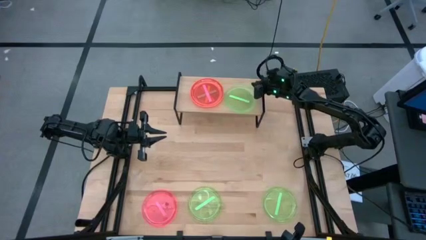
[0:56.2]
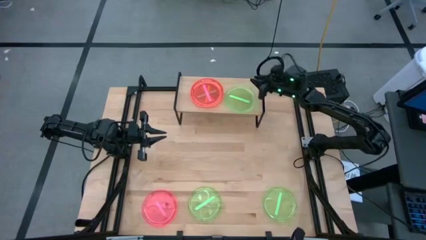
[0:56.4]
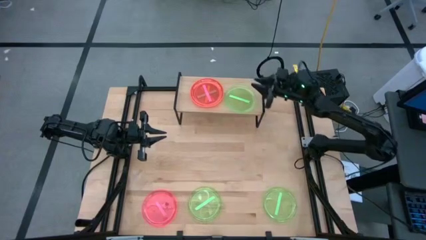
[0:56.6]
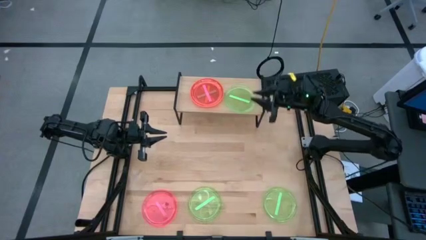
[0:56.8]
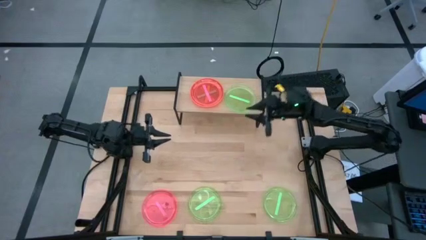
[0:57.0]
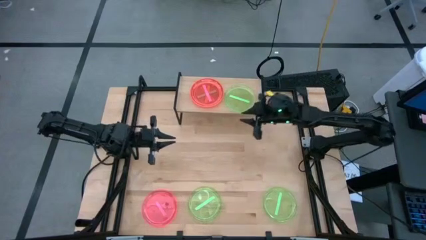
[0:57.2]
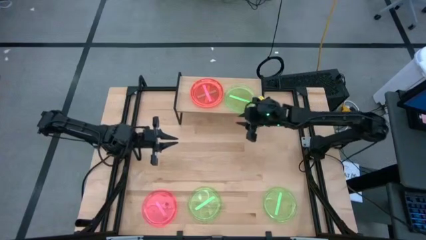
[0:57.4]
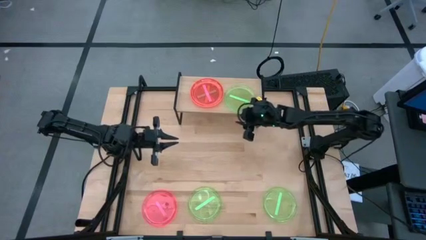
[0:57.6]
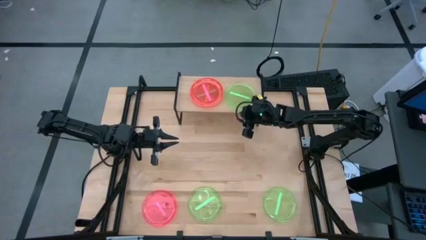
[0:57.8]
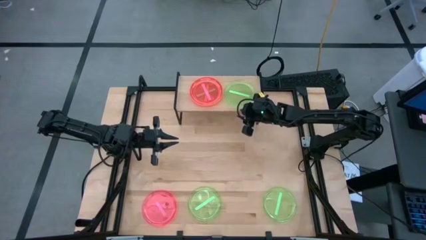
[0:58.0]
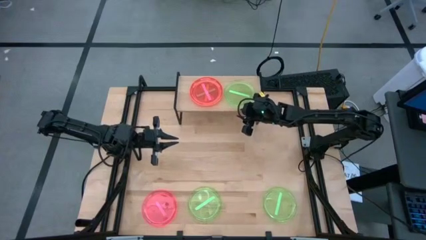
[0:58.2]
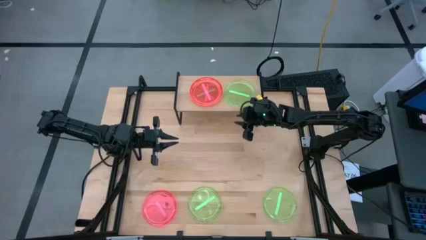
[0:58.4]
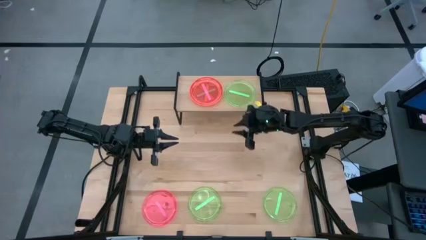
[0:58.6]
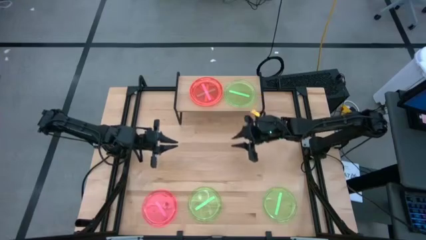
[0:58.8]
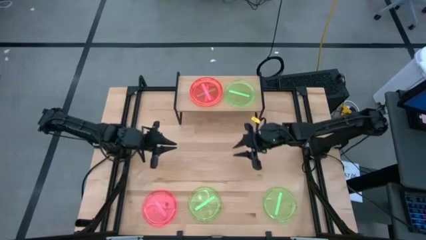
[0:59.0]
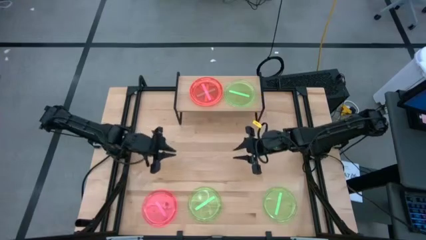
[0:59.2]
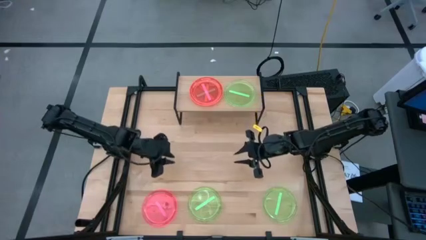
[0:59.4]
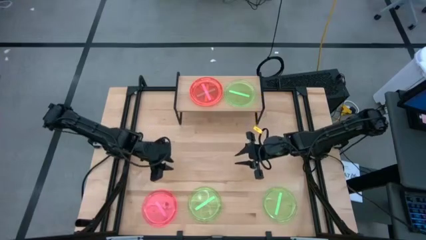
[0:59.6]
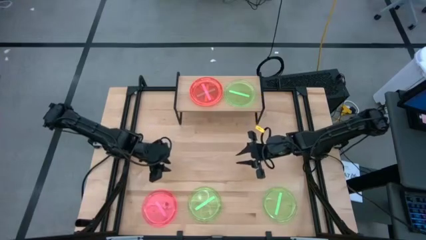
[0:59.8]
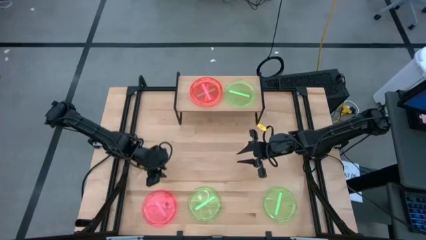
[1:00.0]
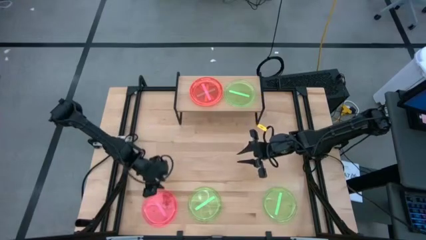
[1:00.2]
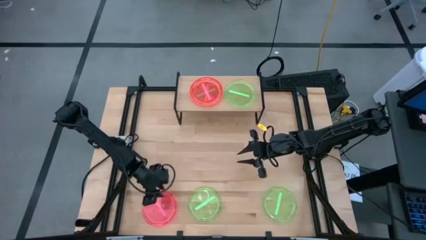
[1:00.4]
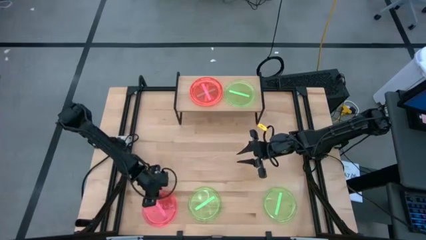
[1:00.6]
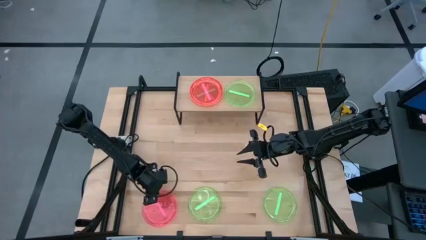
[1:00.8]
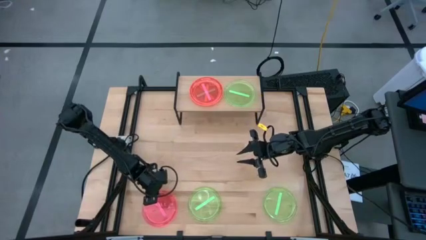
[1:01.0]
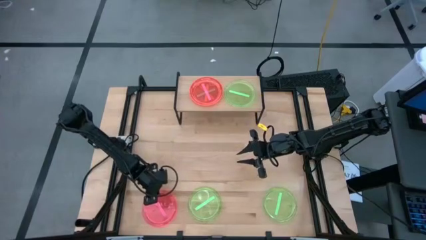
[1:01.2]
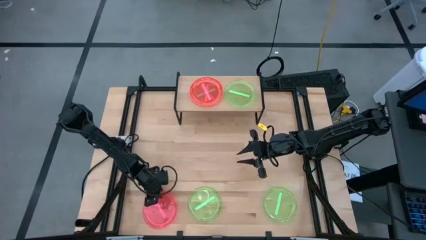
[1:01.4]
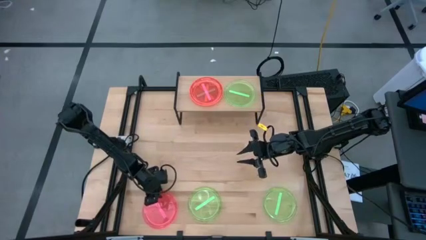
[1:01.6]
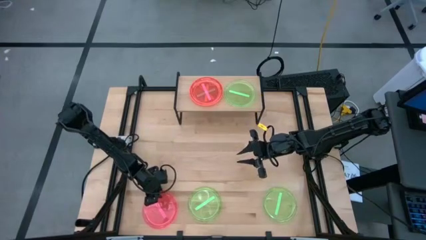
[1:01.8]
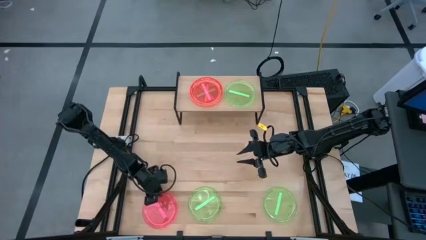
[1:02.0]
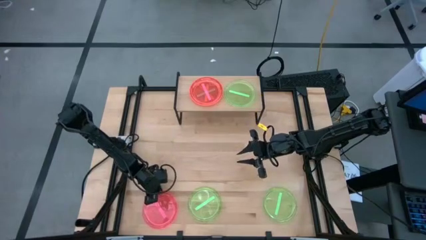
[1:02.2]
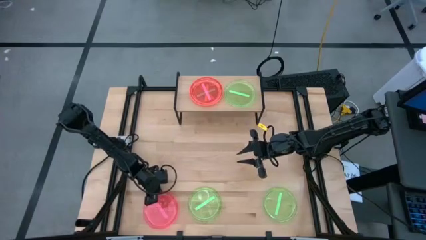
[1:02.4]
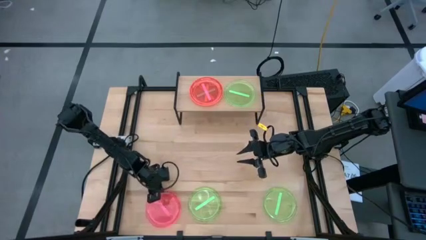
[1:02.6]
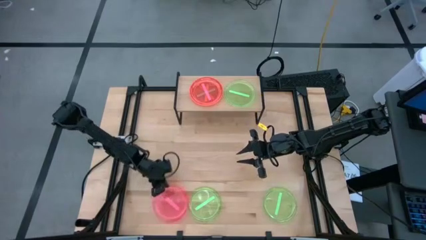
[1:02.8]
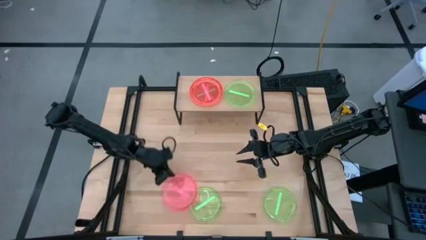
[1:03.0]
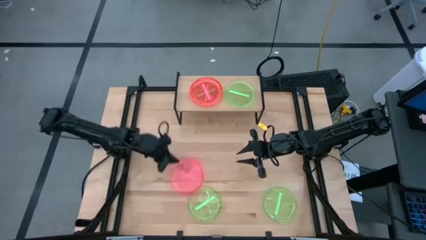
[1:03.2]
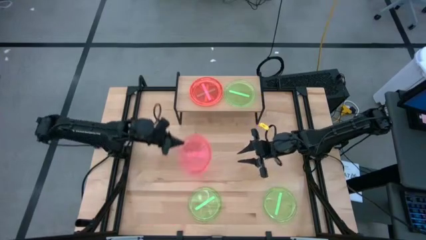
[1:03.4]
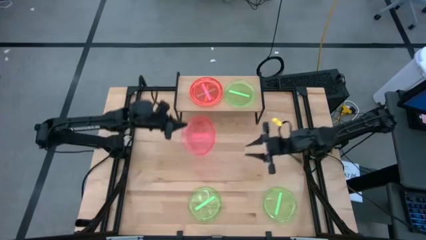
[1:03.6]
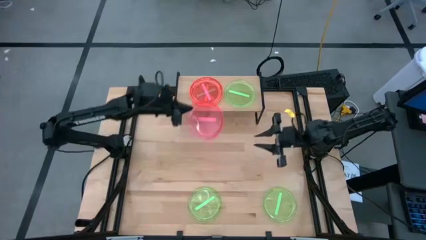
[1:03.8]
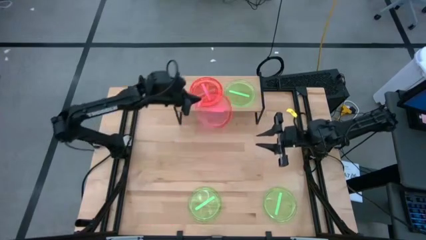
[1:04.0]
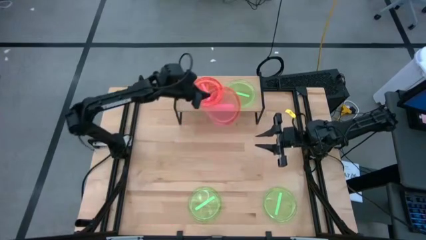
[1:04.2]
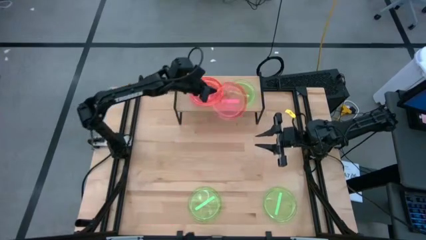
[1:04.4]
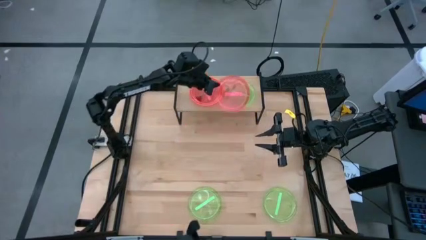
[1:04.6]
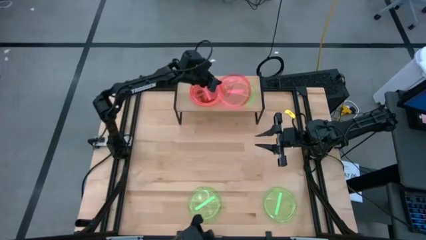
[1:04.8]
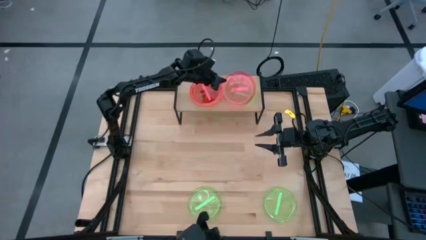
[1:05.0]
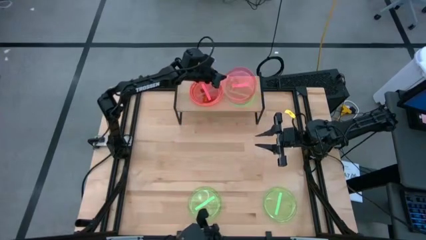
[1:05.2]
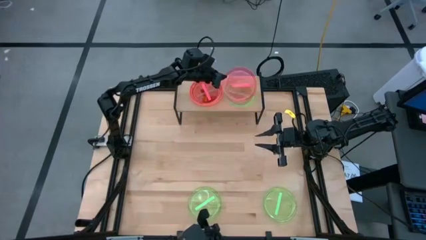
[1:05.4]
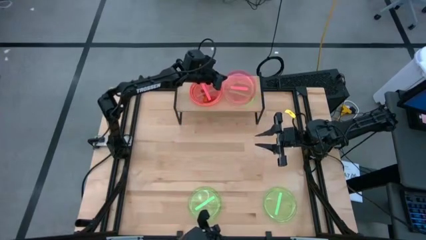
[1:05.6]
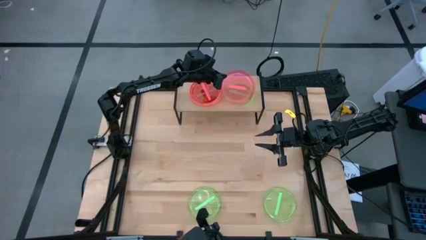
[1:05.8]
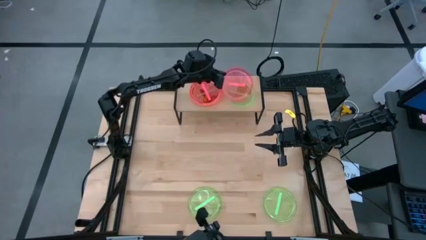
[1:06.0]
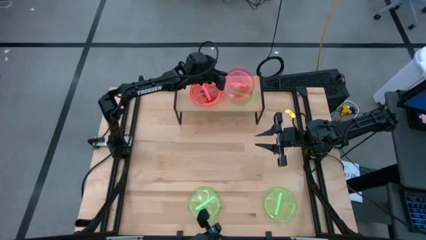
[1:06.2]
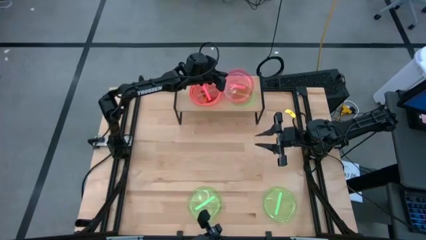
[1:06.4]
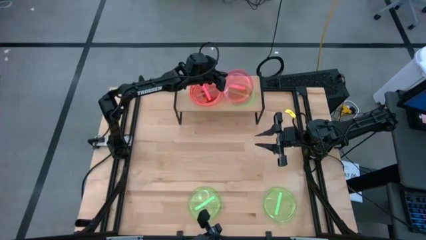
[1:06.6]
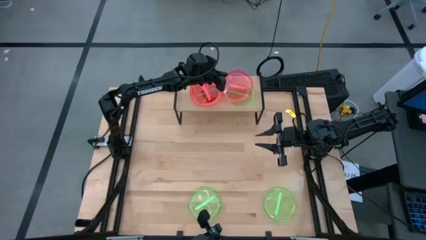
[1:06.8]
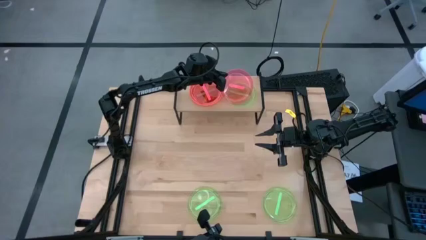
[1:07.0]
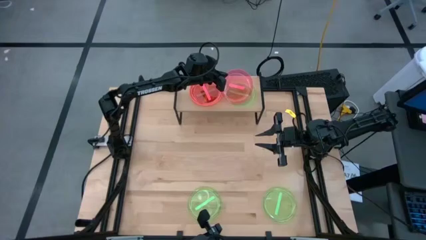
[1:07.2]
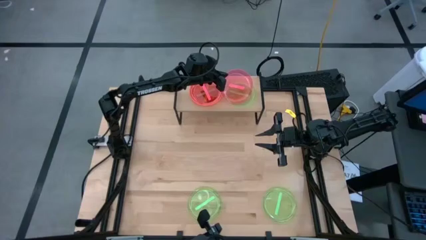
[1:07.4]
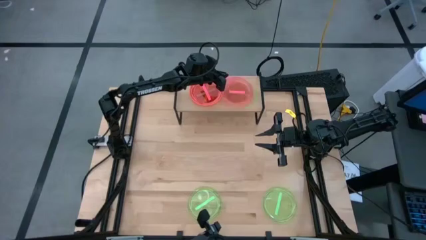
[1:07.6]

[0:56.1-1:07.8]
Task: Place and stack plates onto a shelf
Stack the red plate on top of the green plate

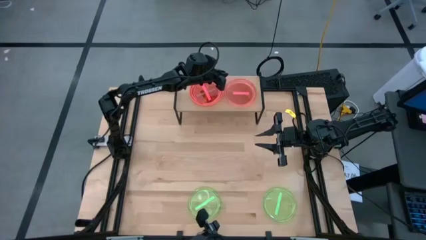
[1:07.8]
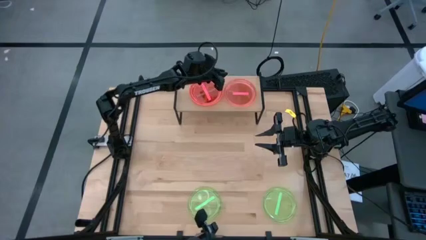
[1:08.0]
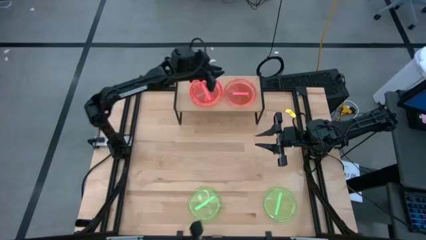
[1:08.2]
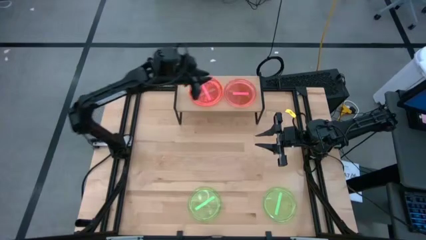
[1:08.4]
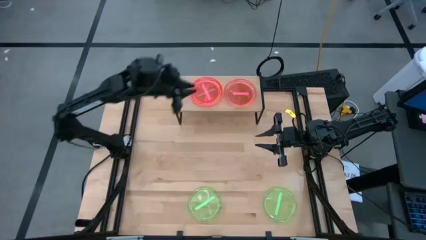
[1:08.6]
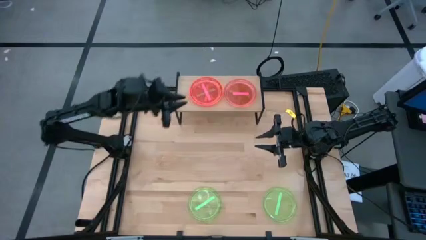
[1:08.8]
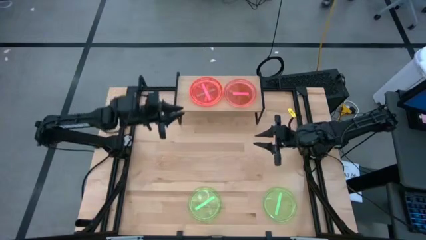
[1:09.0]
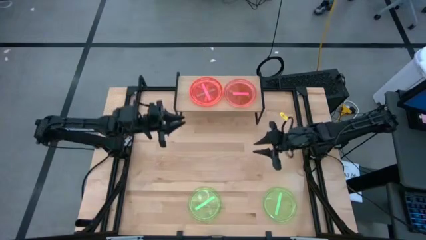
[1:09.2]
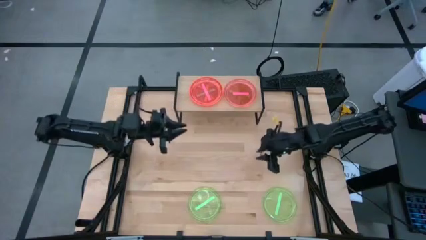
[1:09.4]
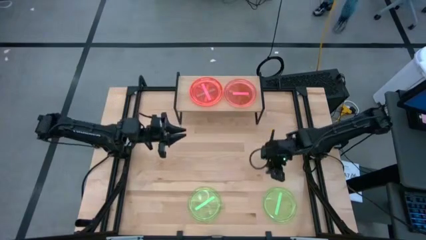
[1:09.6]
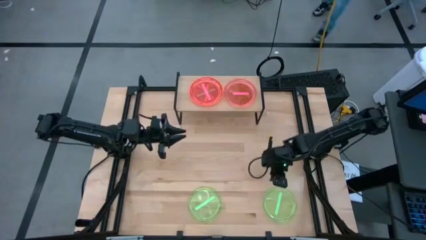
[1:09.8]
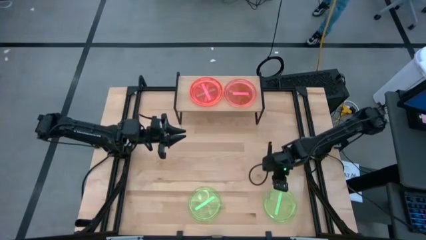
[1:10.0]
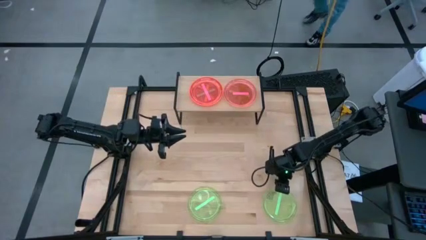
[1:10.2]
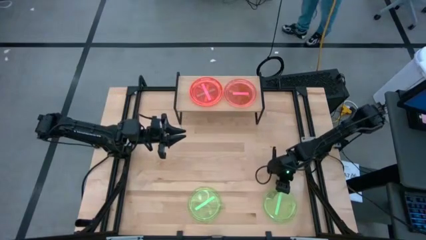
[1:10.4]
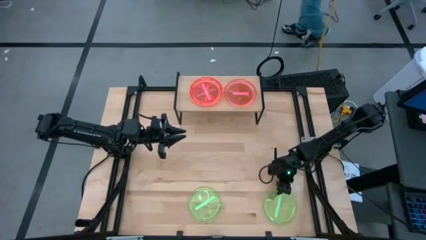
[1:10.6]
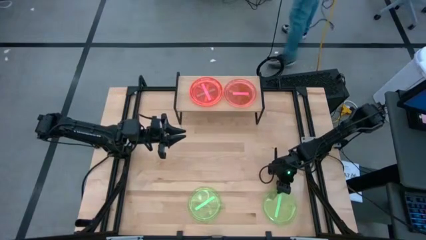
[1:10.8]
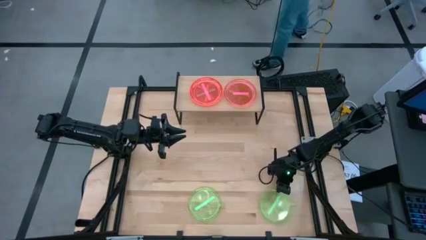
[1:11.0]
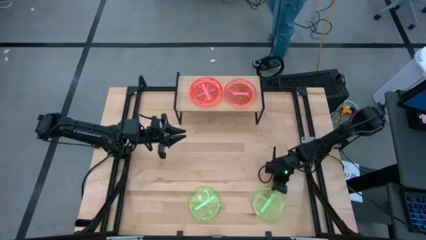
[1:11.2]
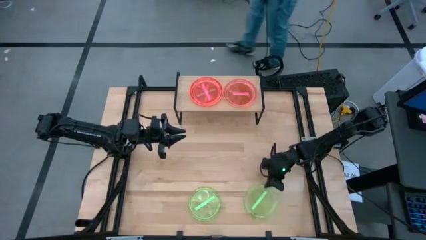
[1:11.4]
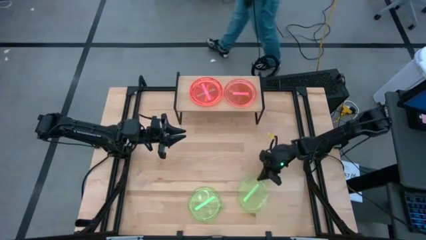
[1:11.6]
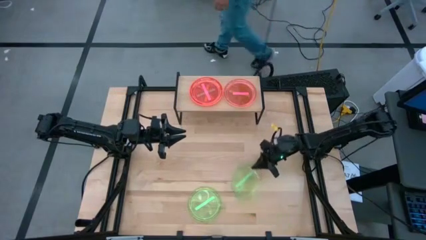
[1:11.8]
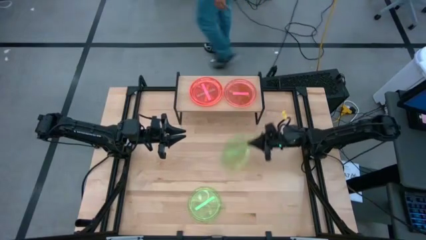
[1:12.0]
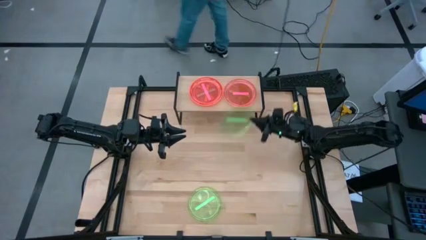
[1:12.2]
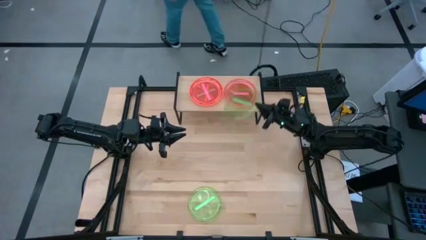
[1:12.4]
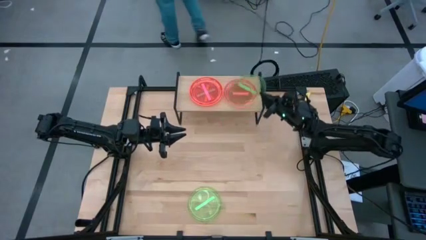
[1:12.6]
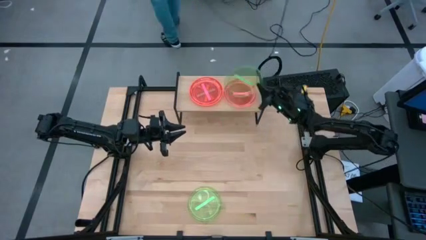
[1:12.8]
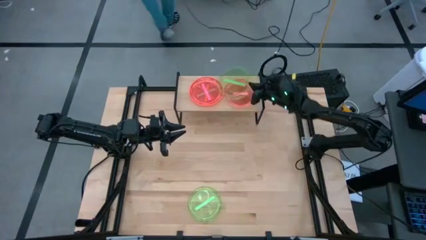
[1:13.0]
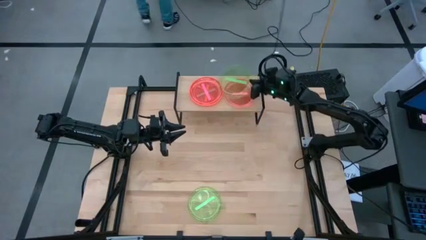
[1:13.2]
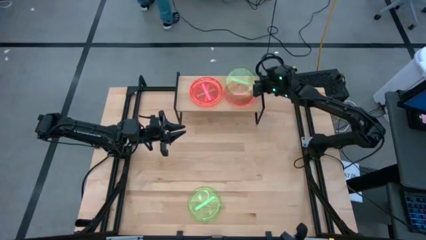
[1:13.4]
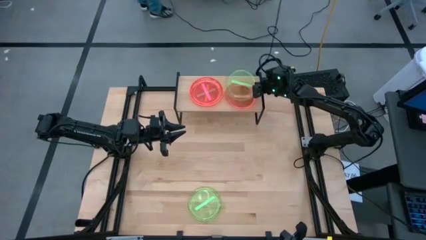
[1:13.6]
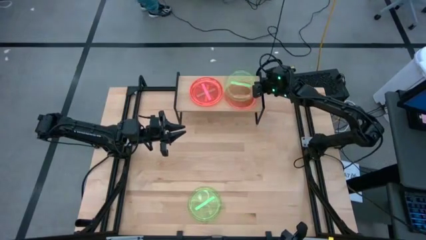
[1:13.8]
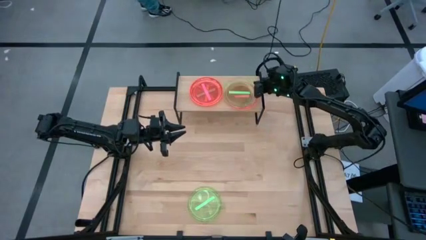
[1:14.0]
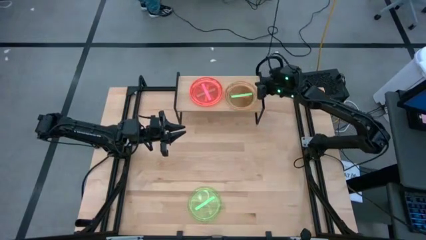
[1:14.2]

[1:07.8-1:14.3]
Stack the right green plate on top of the pink plate
